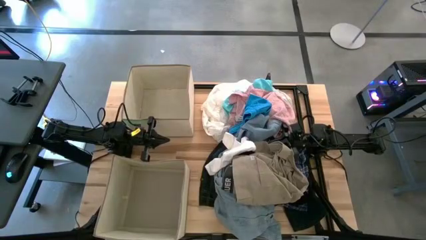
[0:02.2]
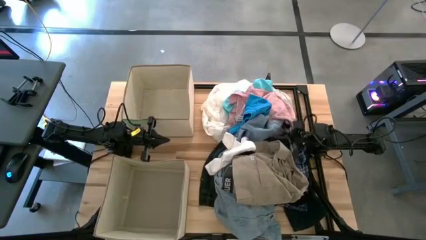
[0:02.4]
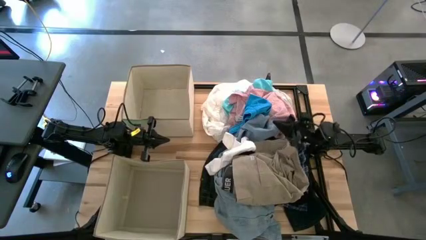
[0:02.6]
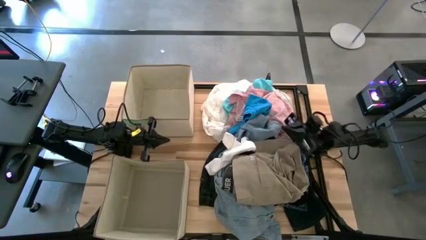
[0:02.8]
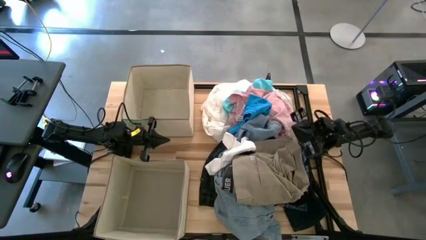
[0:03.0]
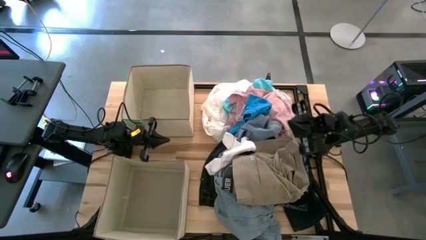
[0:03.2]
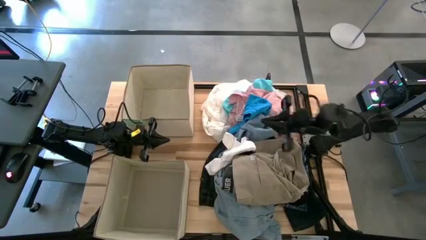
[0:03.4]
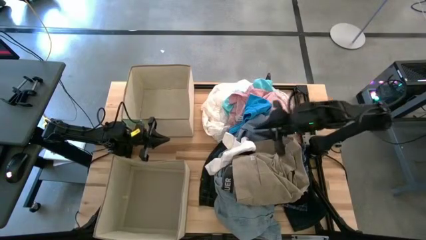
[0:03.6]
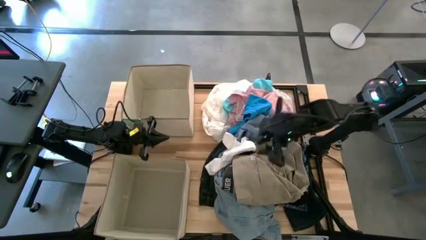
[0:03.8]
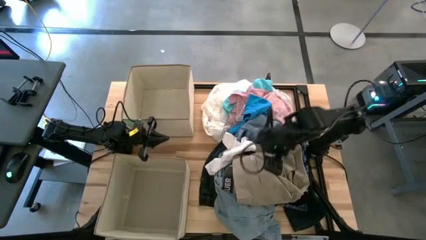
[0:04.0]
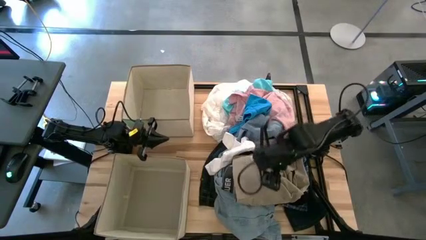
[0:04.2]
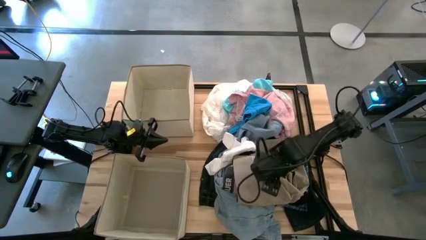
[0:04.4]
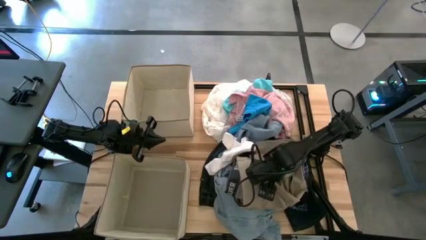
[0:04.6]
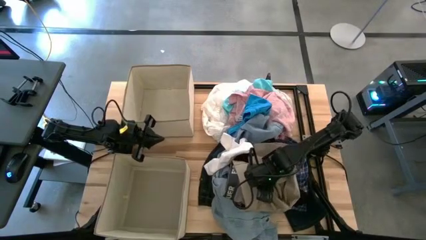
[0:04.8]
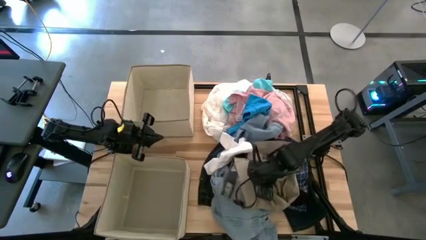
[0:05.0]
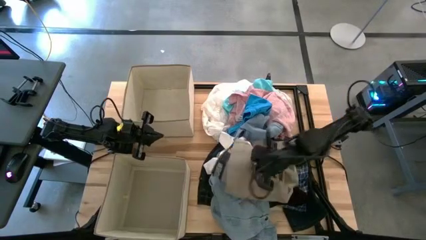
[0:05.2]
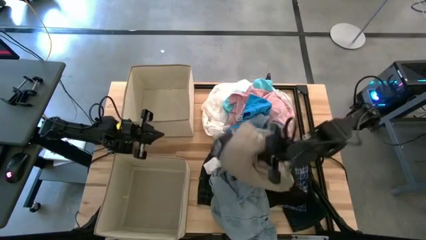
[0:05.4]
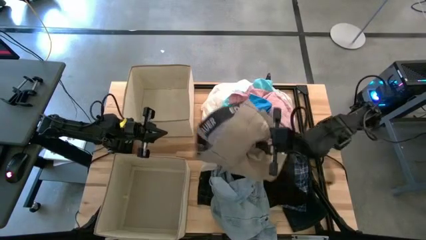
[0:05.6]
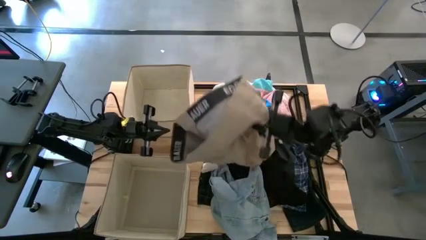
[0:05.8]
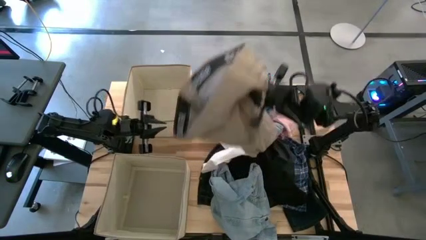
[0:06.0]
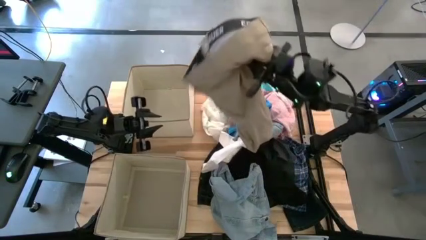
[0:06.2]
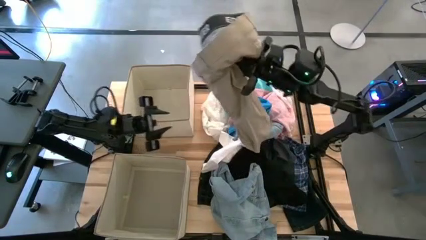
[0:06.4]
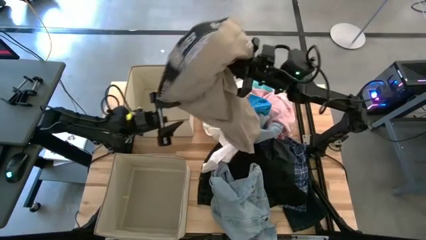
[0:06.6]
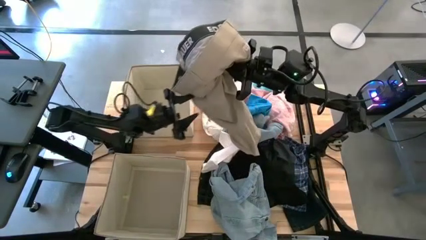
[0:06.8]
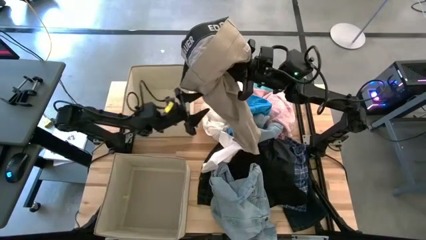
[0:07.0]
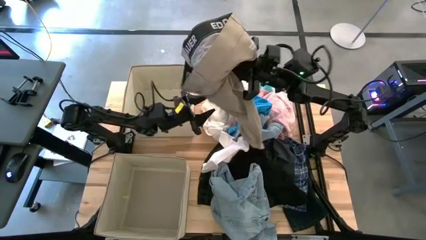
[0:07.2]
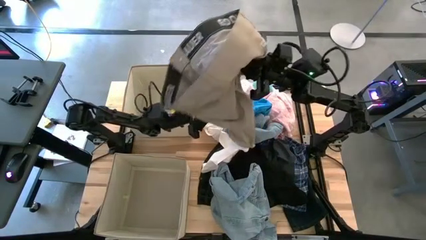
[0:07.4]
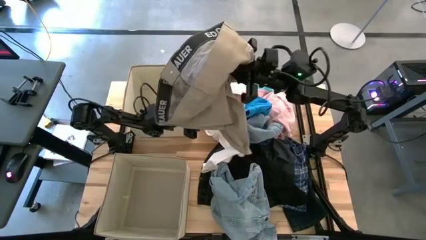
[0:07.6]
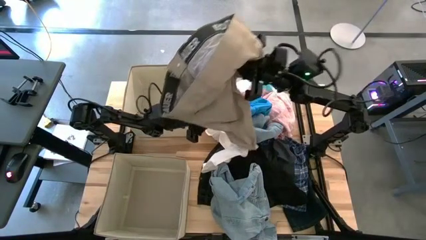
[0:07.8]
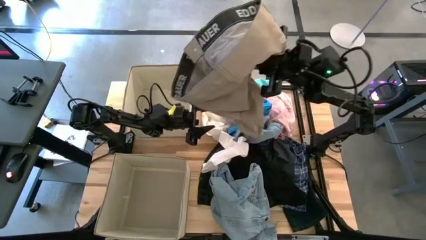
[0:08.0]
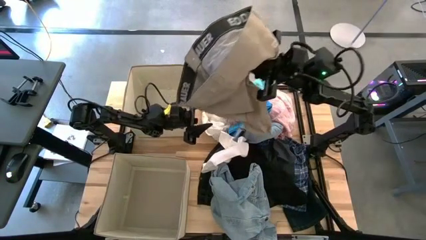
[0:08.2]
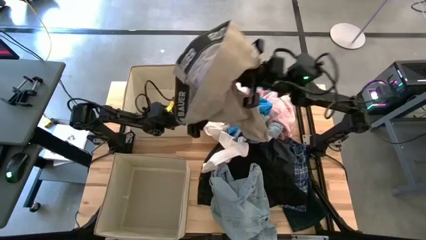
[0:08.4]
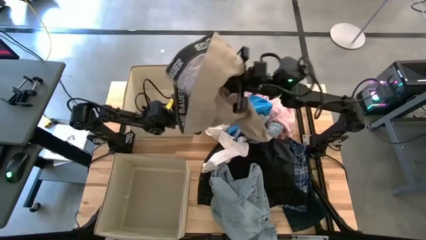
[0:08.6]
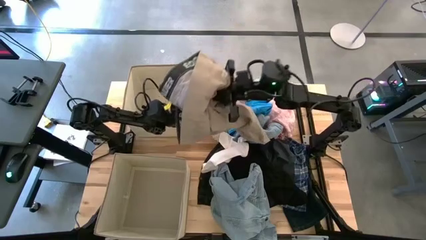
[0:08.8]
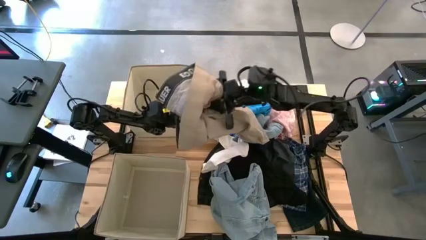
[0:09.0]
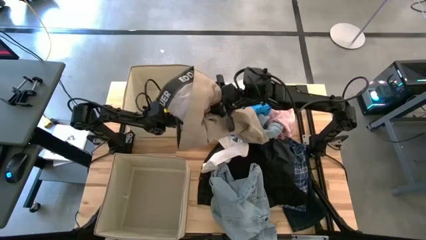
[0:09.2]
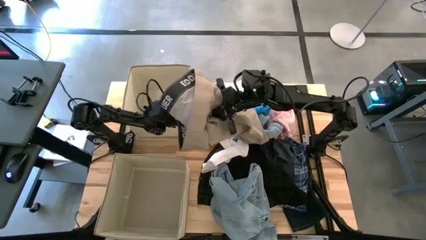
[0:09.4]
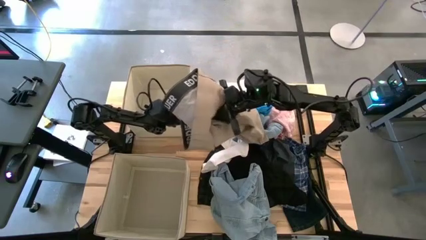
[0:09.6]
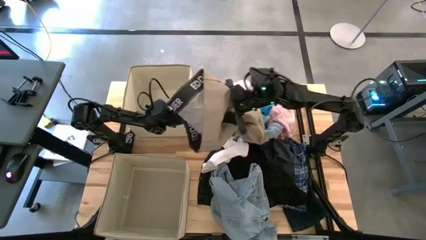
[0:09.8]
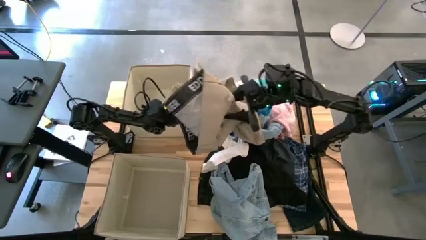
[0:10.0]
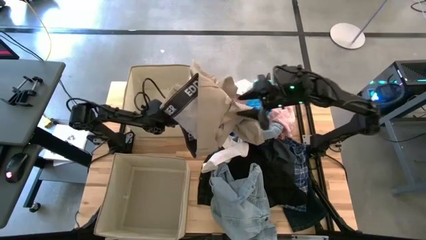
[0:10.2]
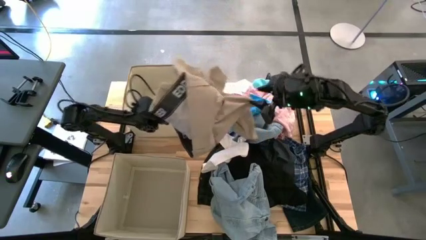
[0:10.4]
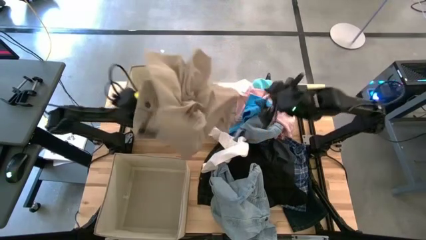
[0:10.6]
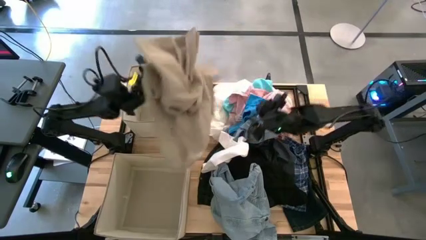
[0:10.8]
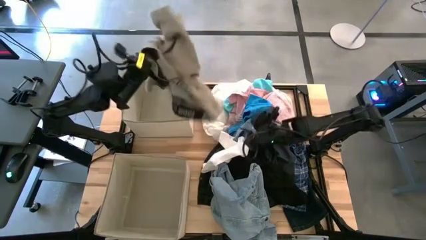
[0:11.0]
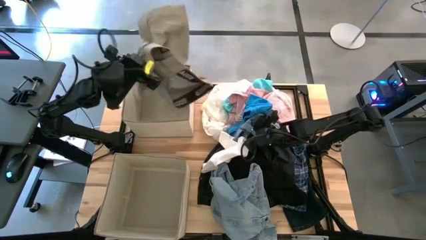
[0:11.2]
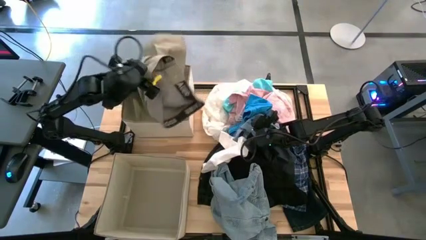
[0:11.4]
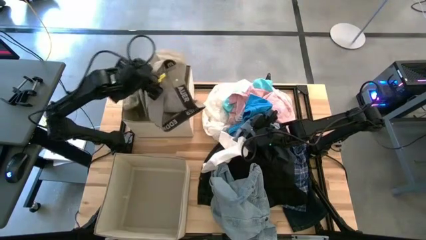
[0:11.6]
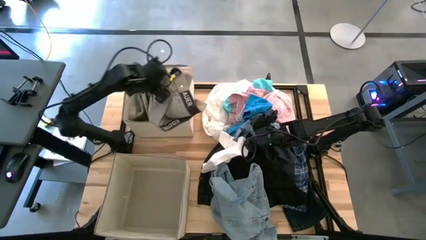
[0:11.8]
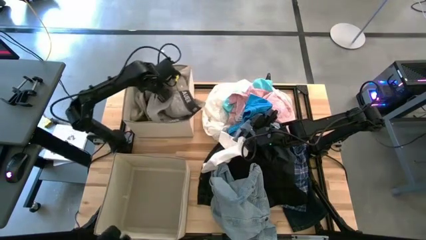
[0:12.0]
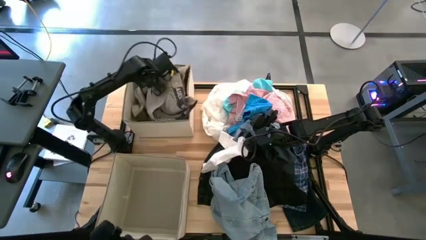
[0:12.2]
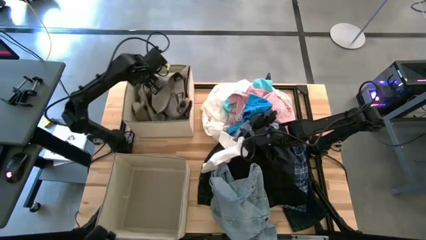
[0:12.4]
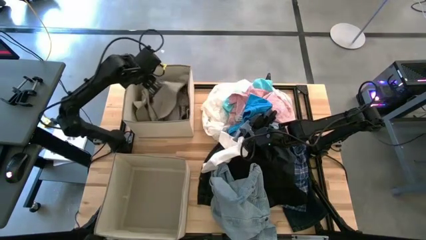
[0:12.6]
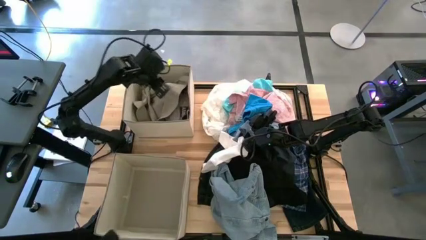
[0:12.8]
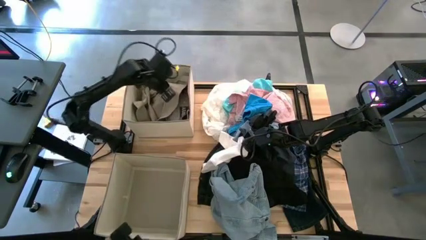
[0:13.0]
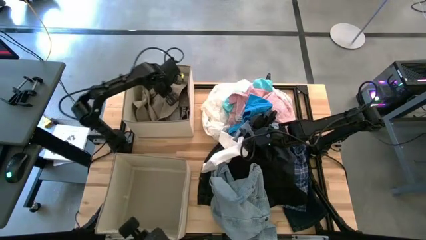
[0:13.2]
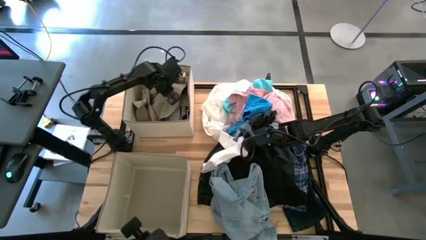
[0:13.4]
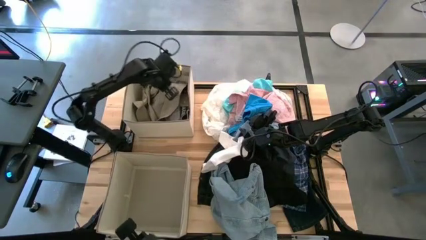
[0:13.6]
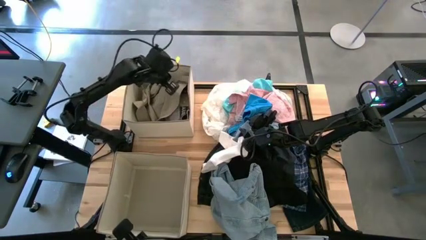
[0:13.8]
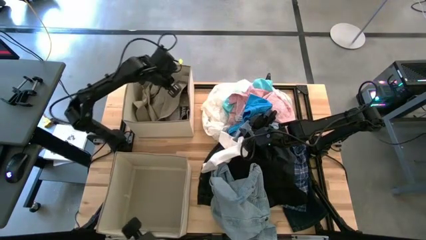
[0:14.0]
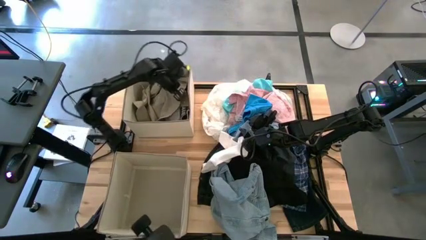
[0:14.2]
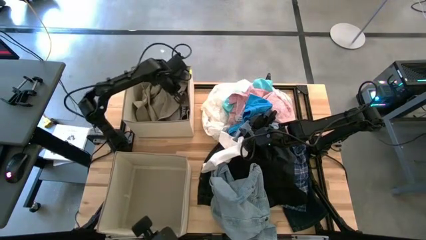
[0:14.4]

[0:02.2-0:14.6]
Task: Sort clothes
Put the brown shorts into the top brown laundry organizer

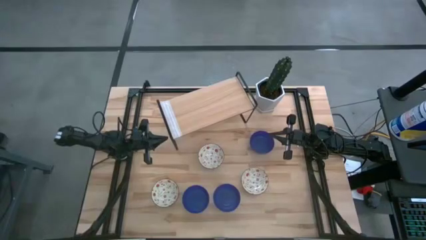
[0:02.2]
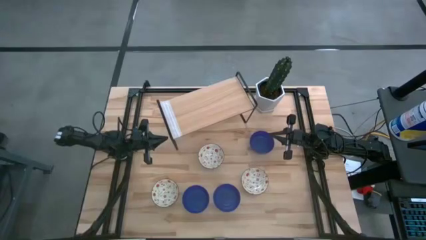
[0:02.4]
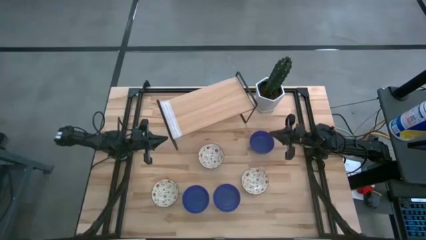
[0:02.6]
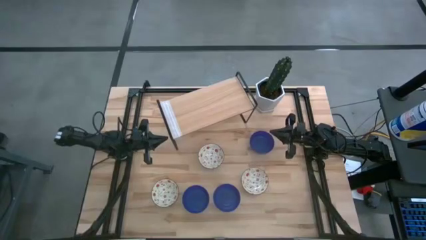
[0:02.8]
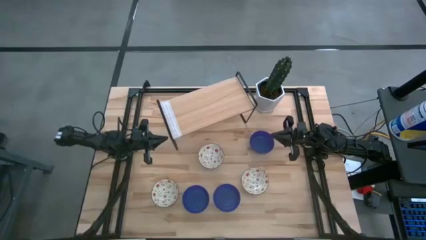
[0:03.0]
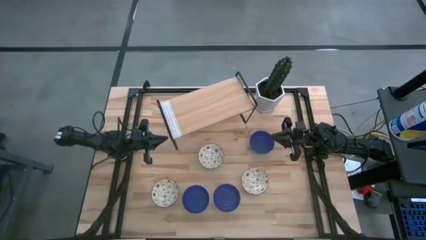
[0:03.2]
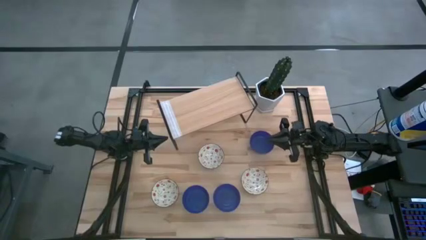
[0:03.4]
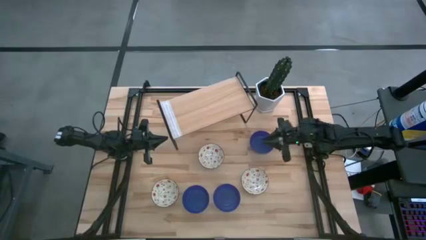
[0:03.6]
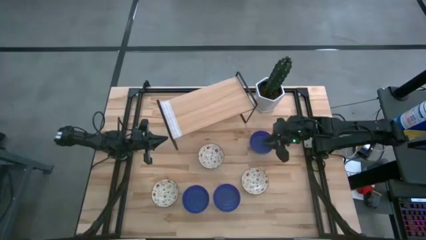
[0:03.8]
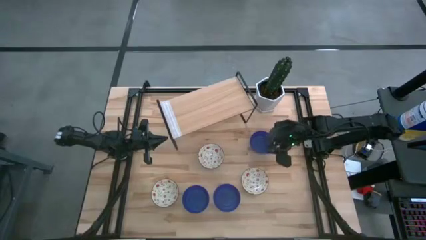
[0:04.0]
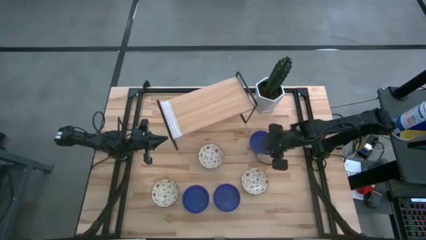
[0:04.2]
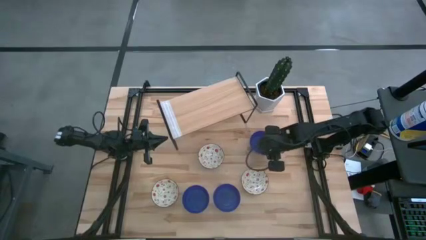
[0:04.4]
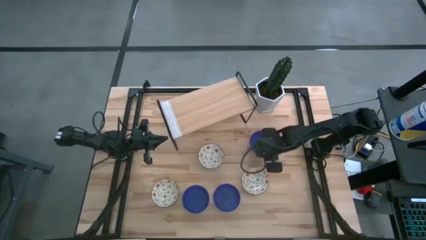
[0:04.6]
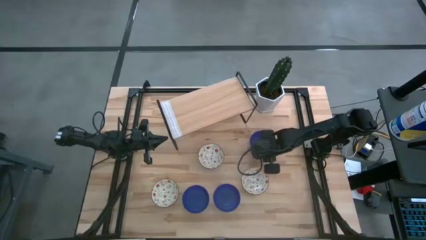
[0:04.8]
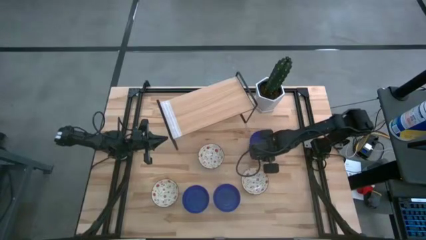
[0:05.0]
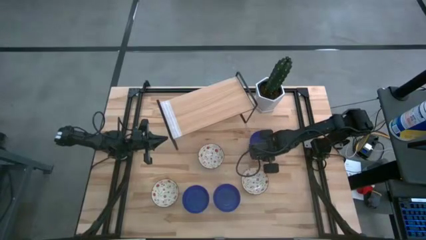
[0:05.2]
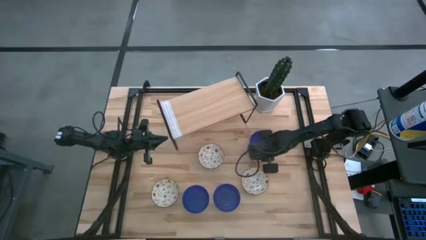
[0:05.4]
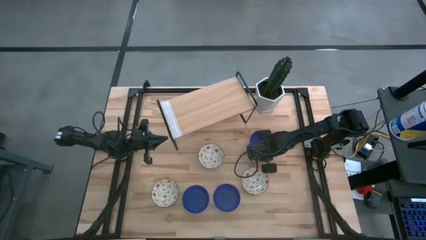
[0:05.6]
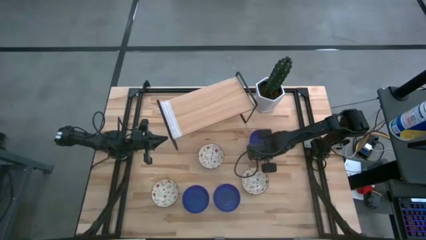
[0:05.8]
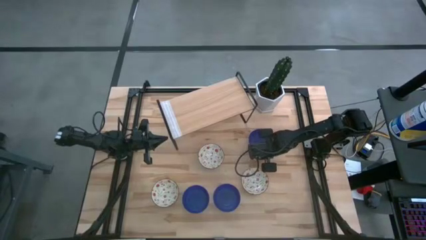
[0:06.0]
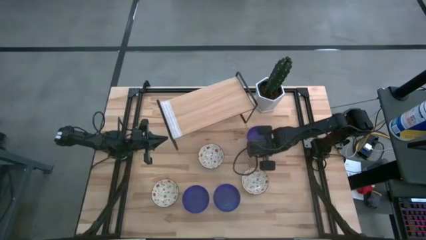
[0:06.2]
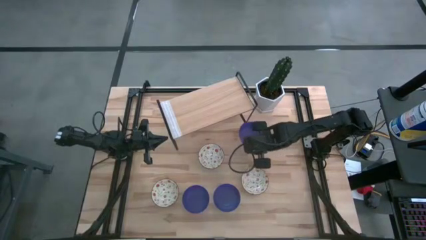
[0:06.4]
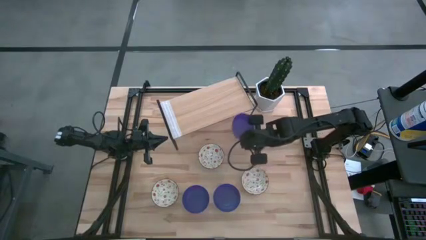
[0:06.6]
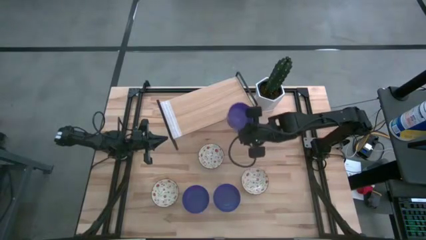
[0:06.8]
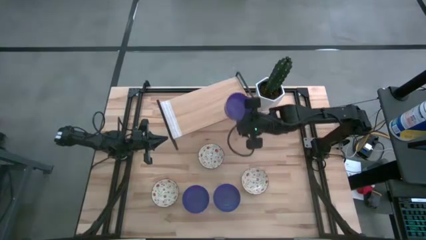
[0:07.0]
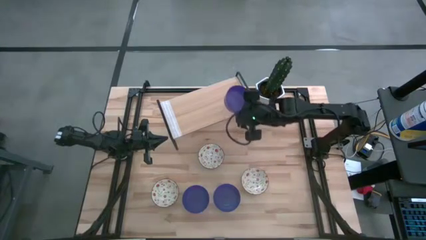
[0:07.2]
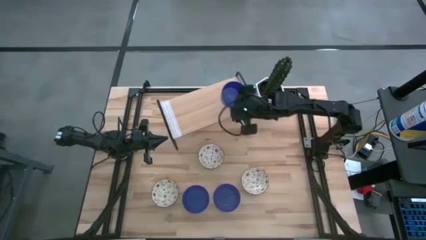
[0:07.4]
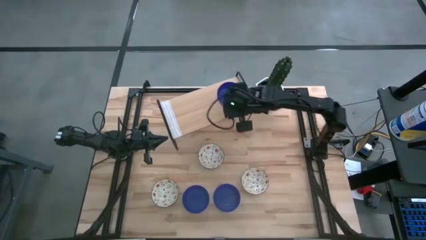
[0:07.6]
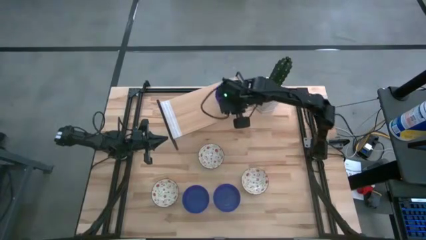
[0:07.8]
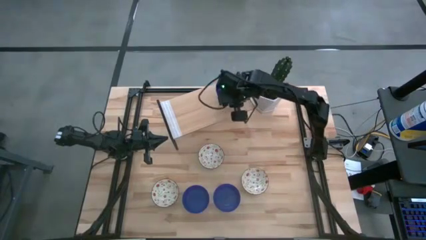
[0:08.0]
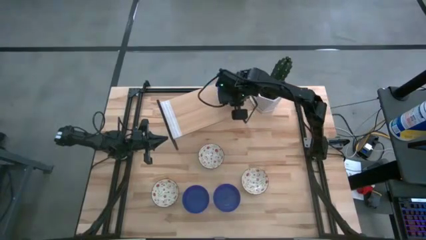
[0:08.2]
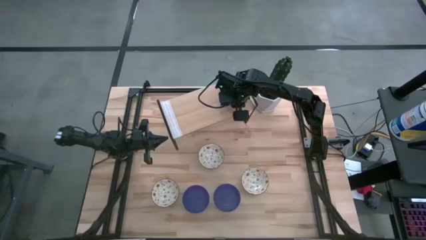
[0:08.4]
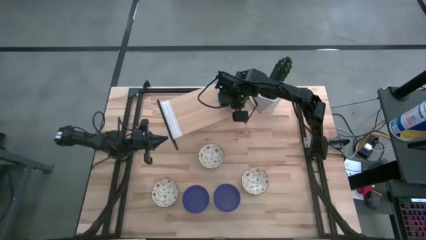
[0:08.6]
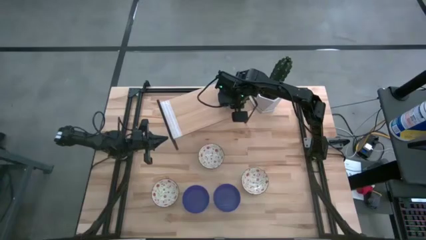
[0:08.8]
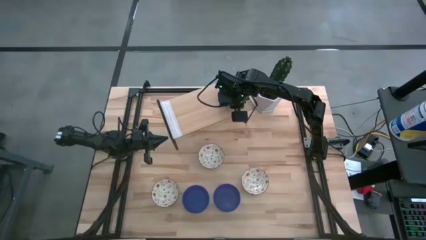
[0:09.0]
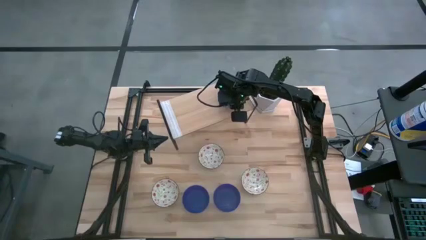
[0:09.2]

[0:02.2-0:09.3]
Task: Pick & Place Mini bowls
Put the top blue bowl on the shelf
